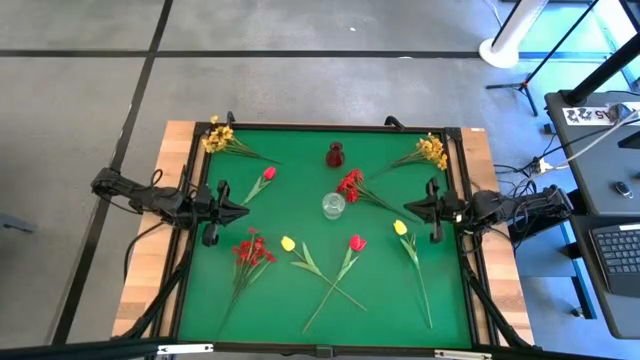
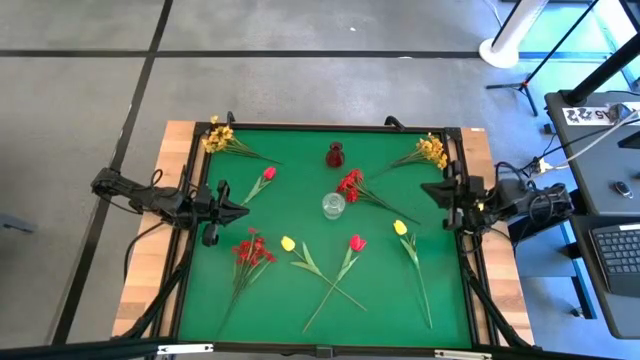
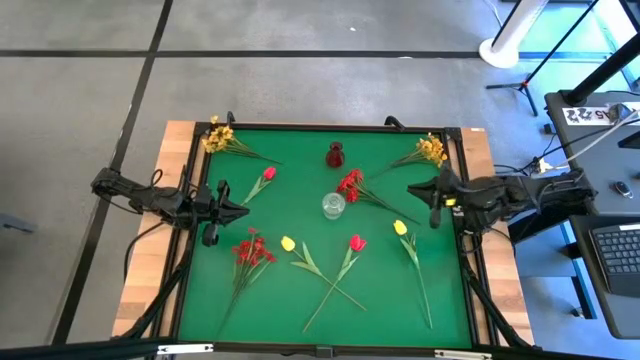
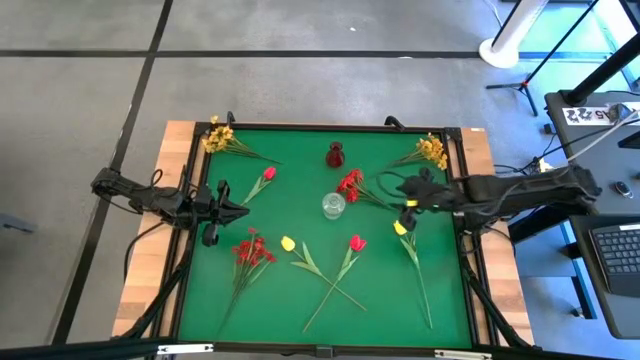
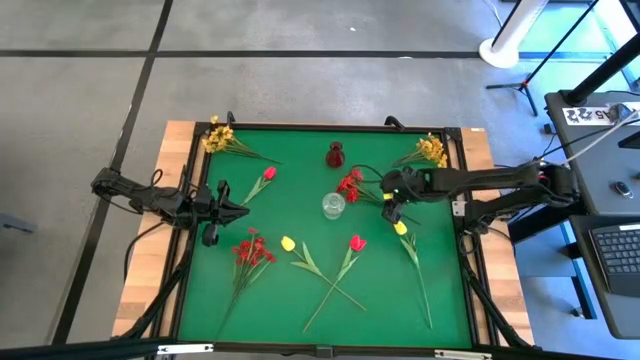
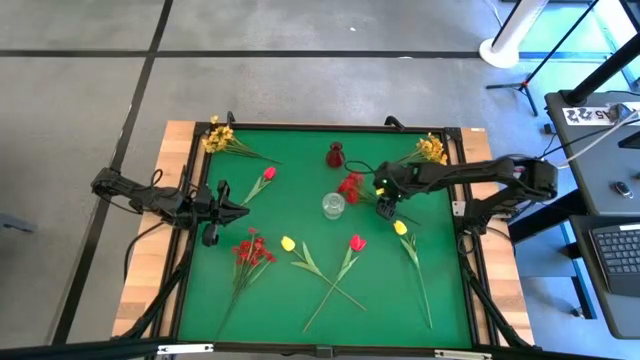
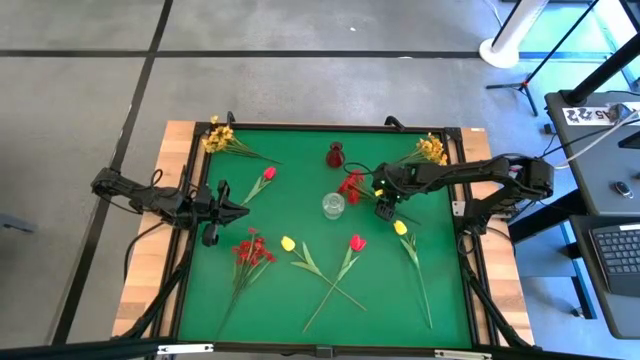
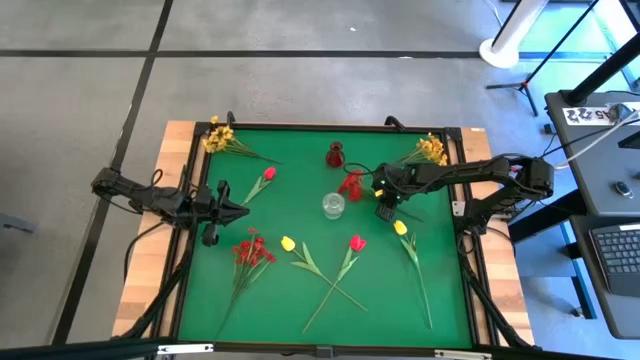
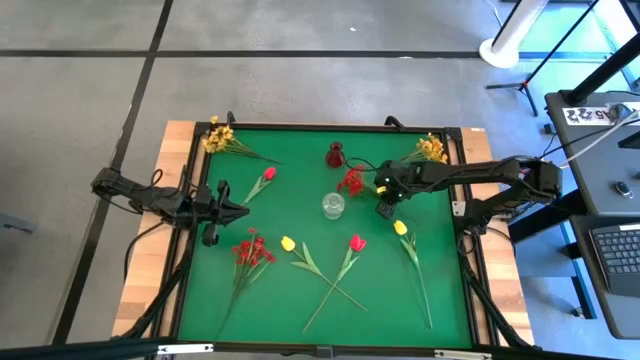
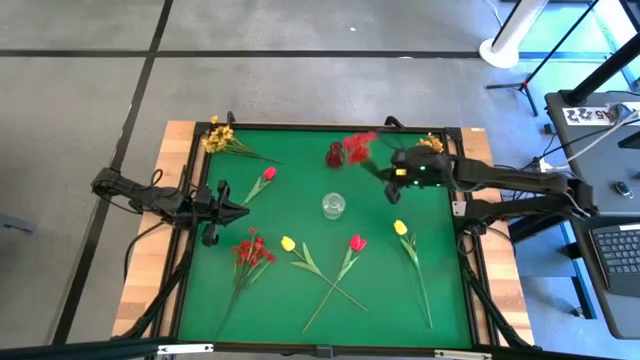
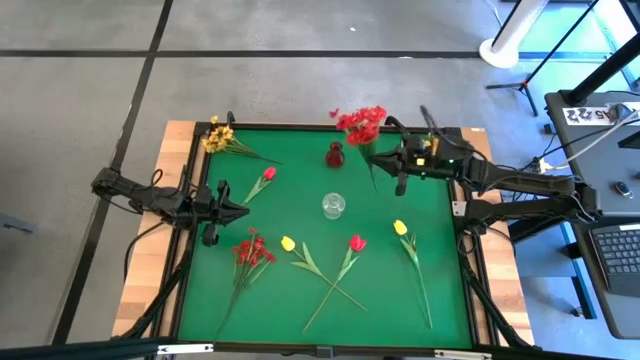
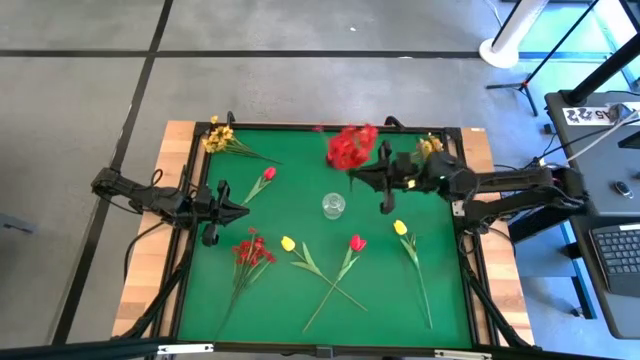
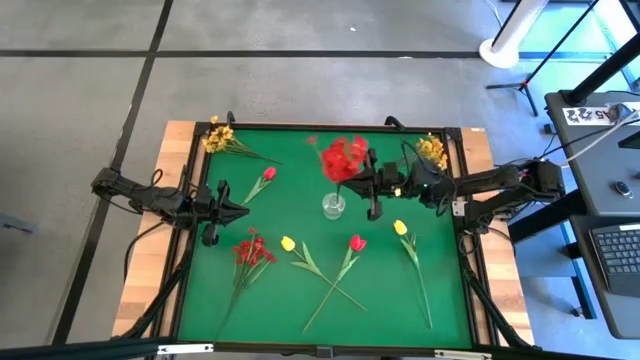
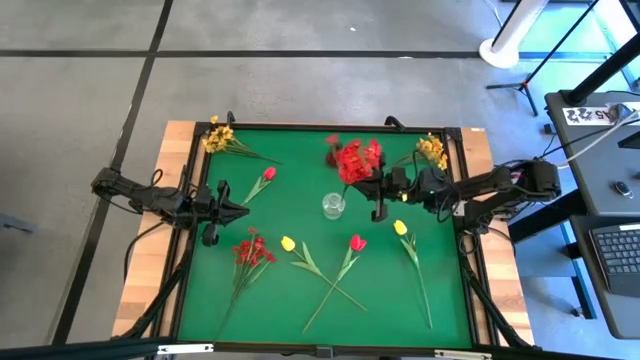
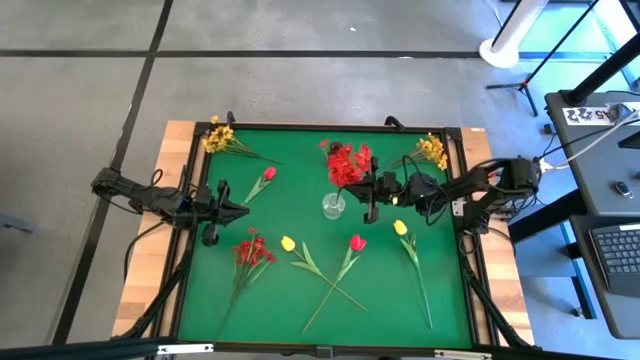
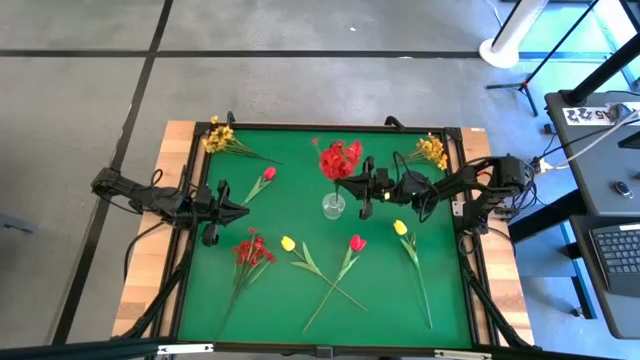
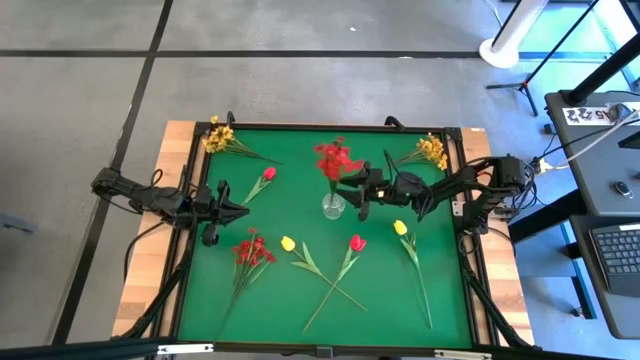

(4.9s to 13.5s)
Task: Sort flowers into vase by color
Put the top red flowers into the transparent vase

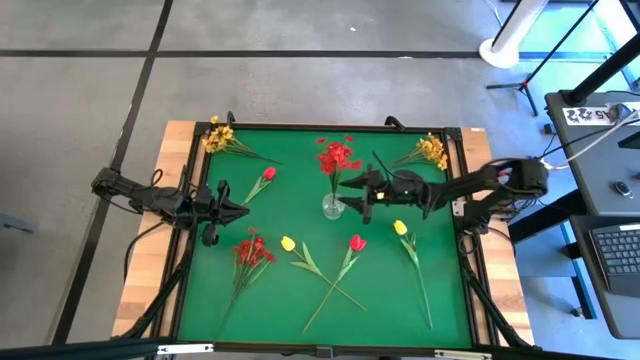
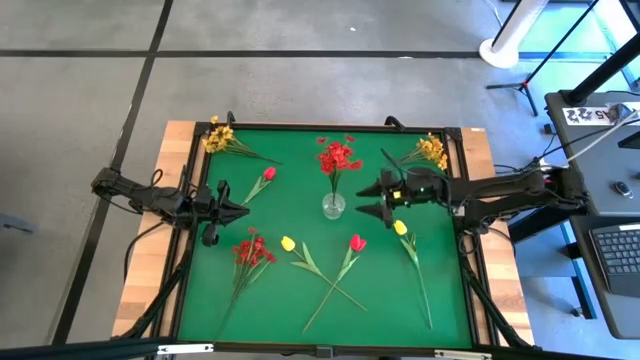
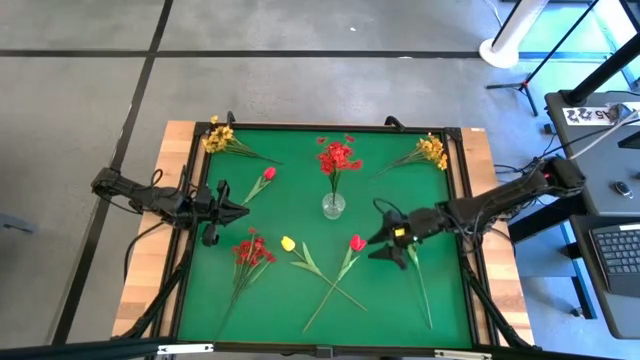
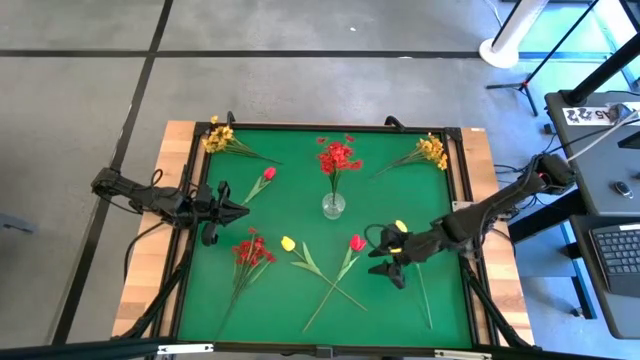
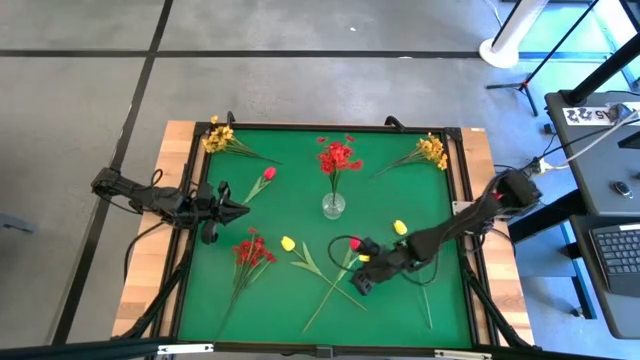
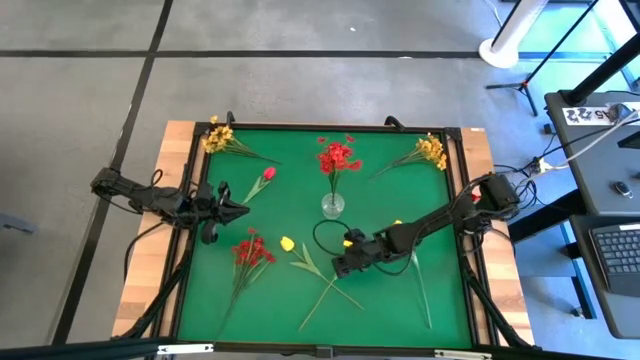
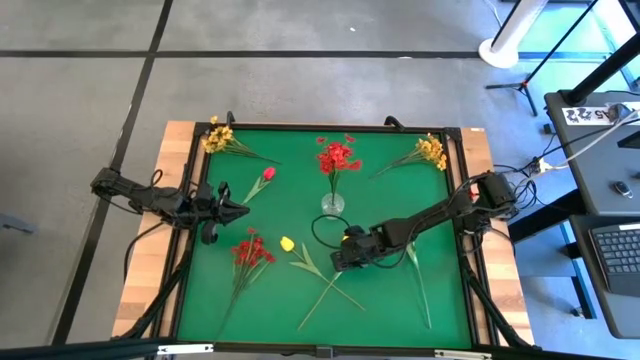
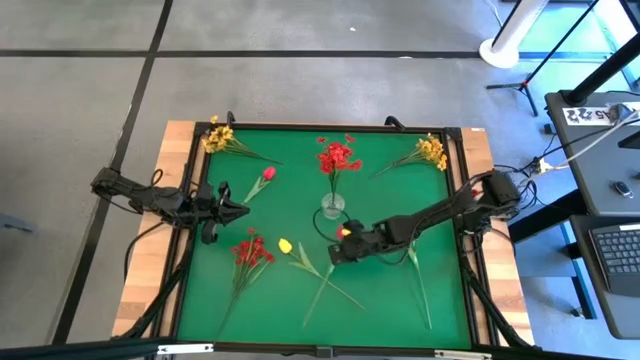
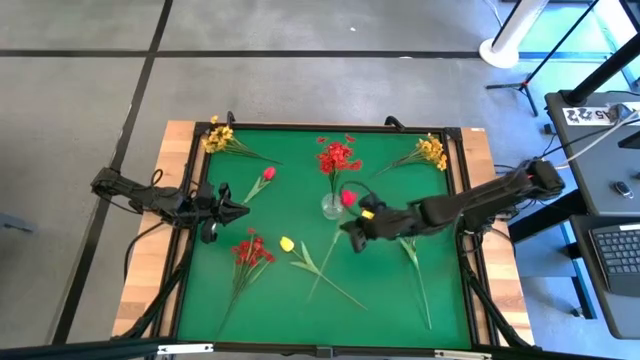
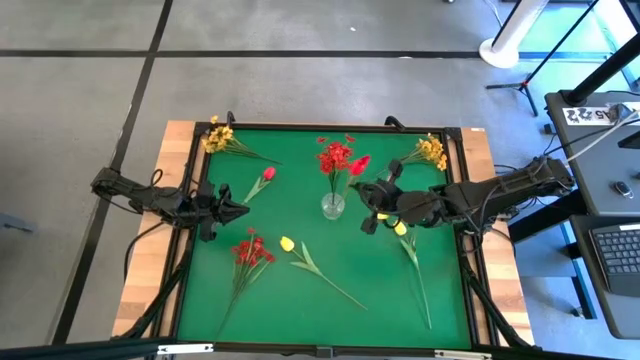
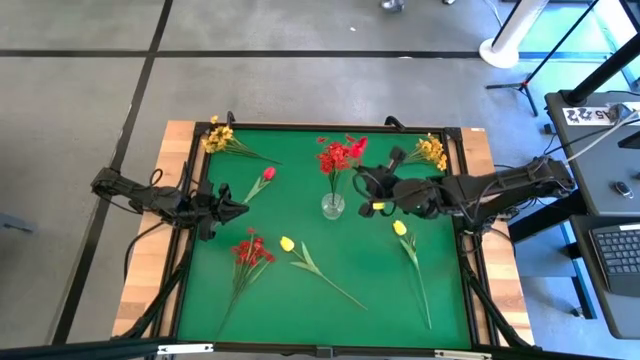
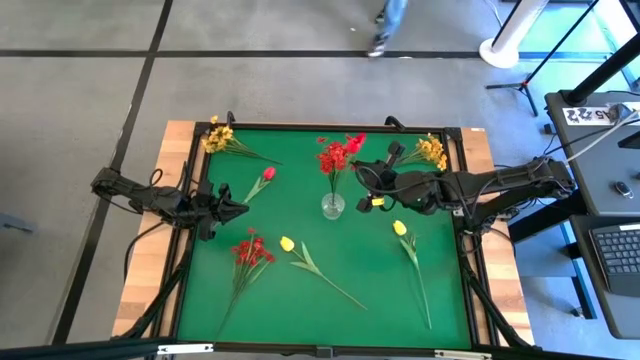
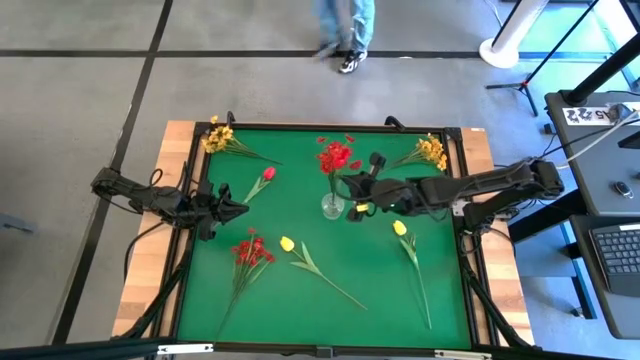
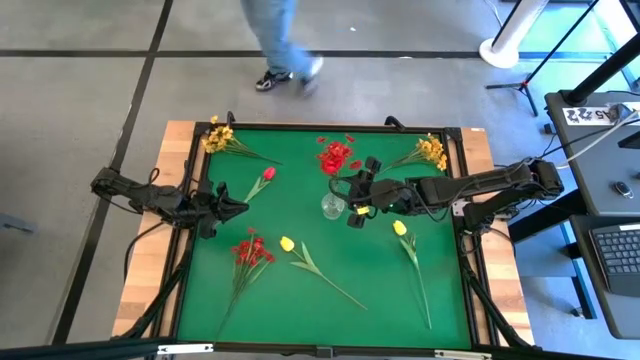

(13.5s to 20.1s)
Put the bottom red flower into the transparent vase

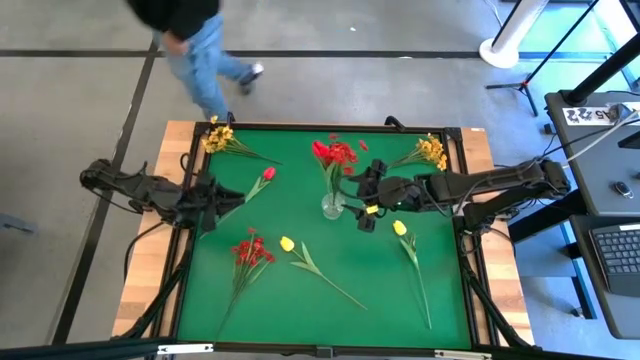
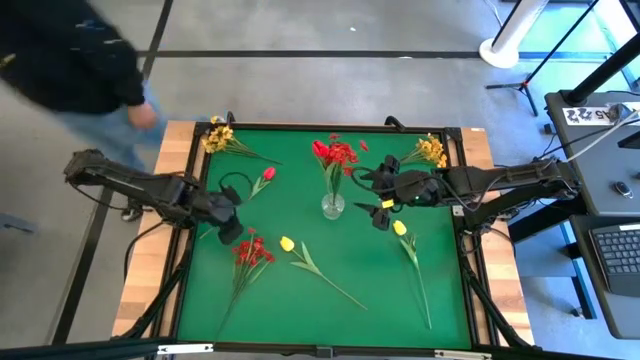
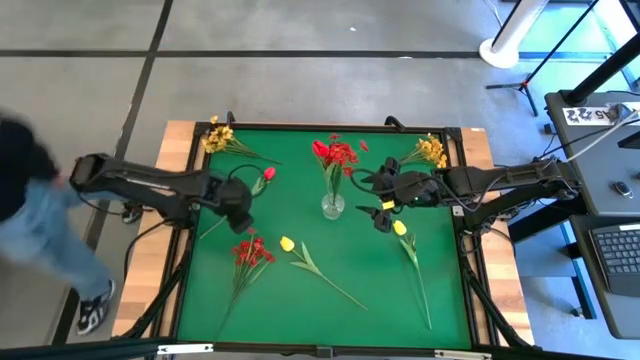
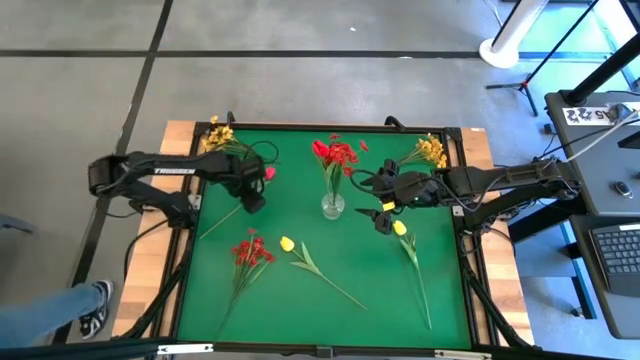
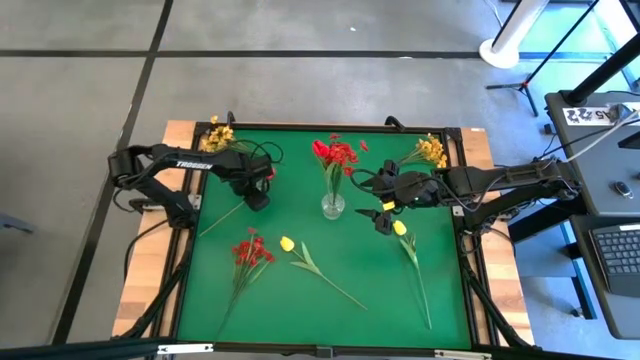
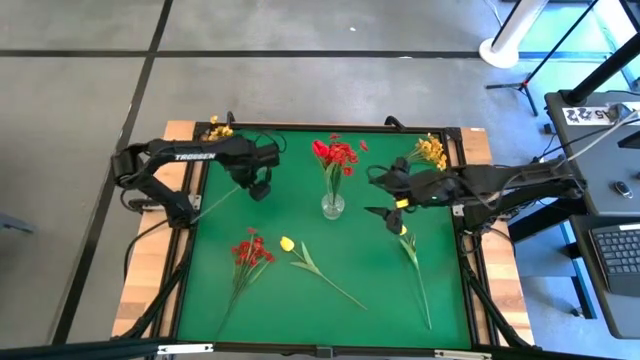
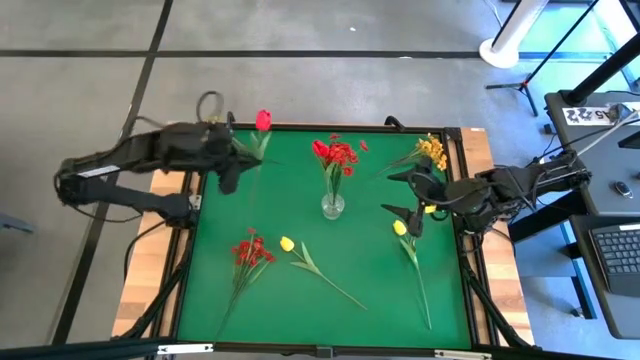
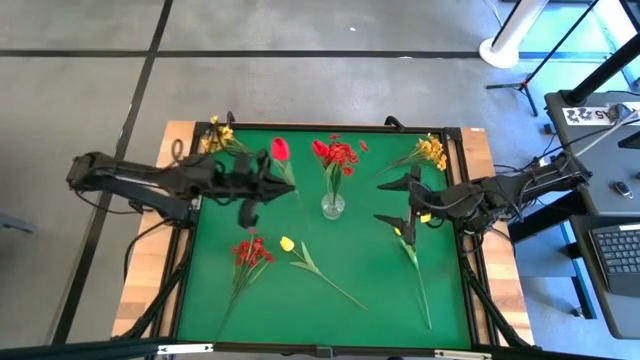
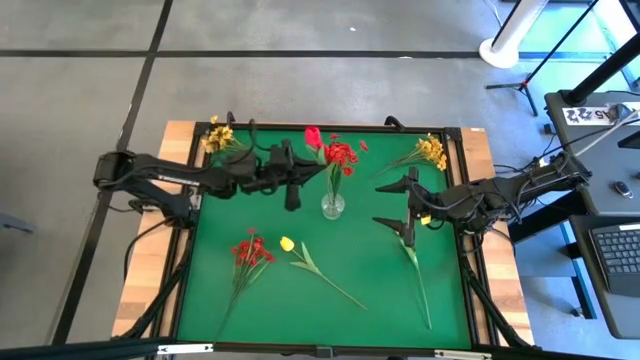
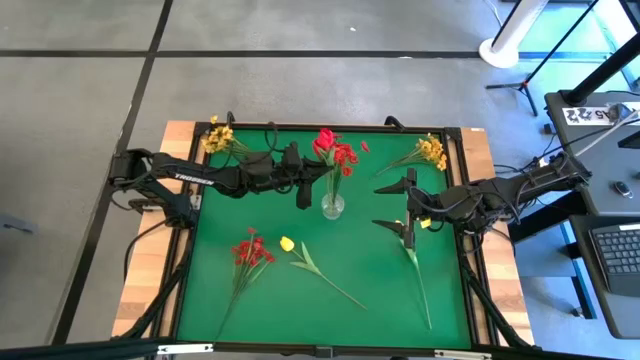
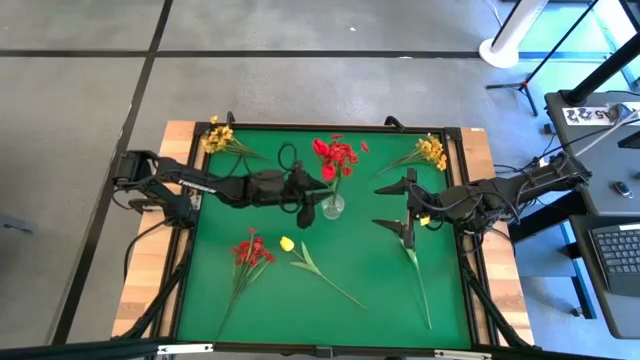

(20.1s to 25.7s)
Put the red flower into the transparent vase
